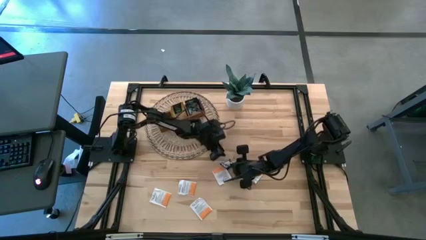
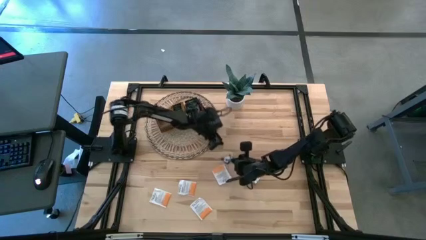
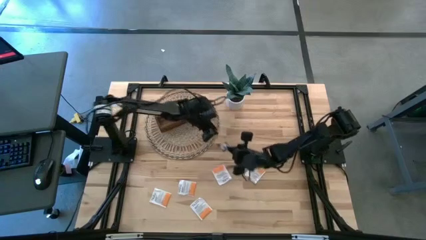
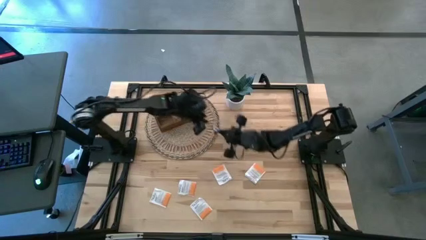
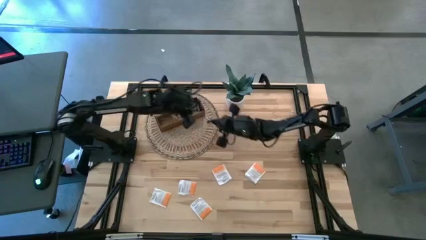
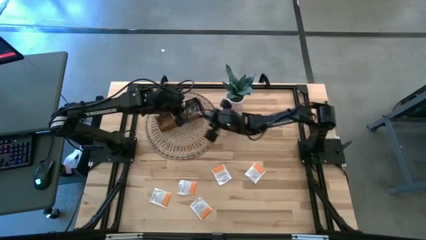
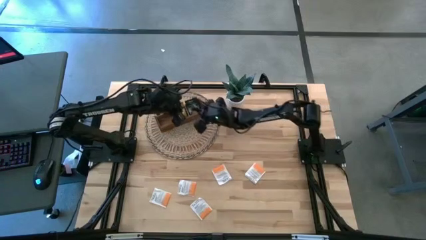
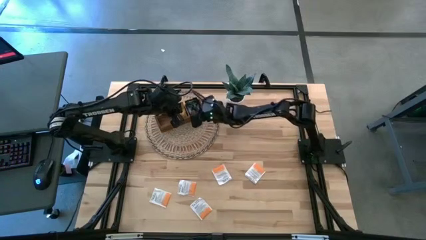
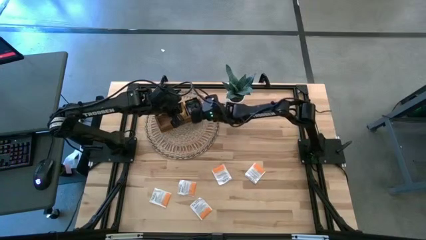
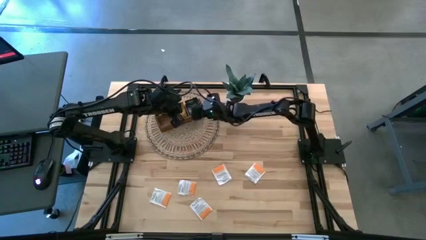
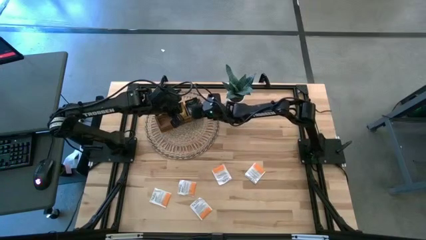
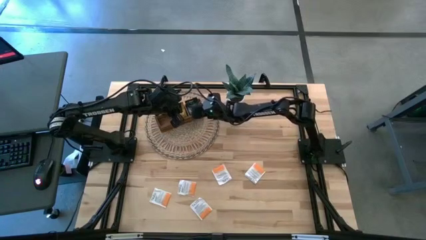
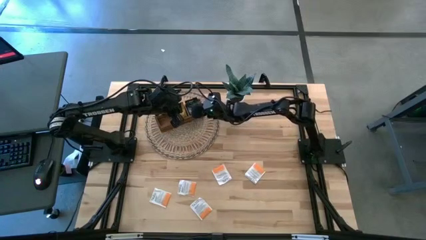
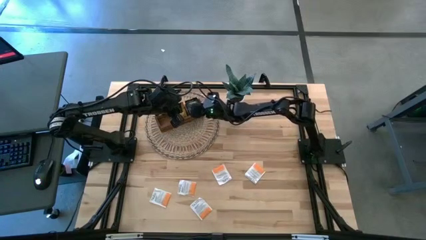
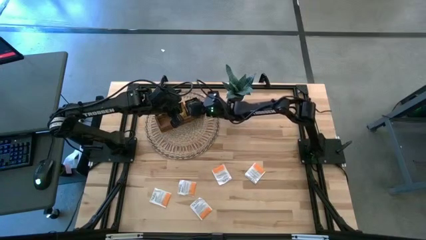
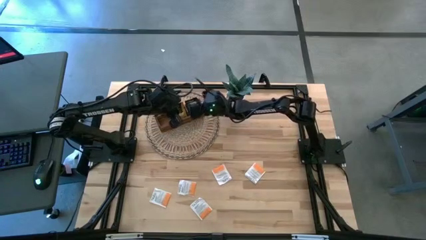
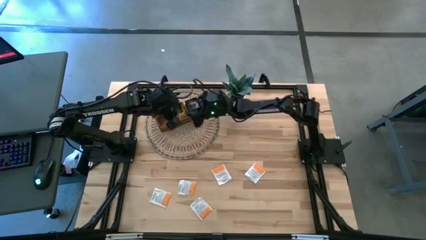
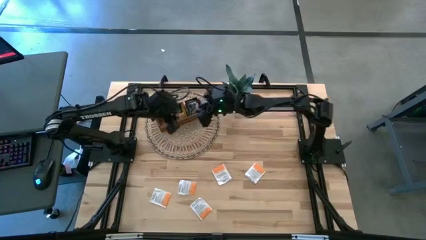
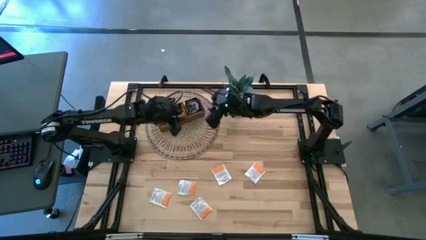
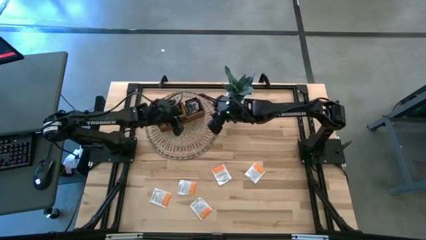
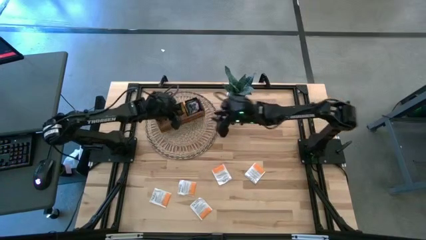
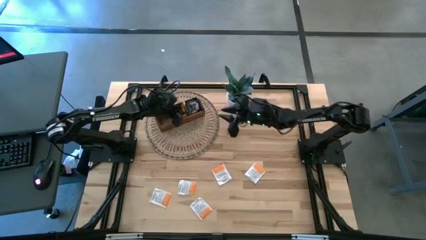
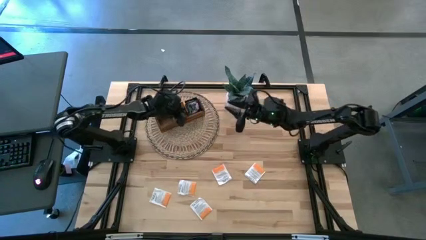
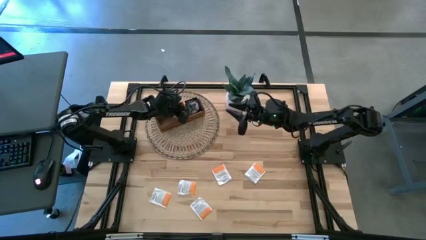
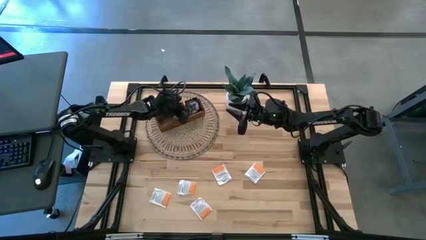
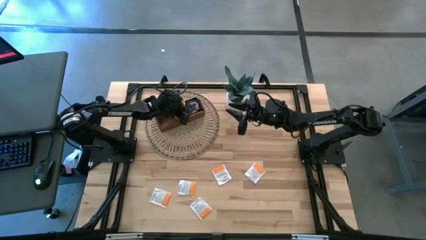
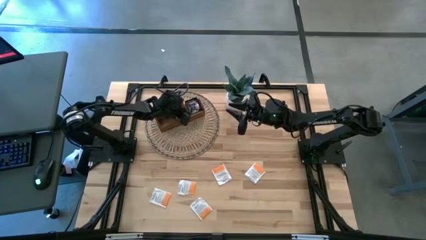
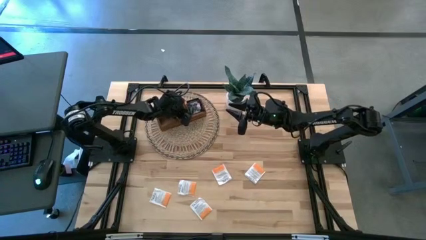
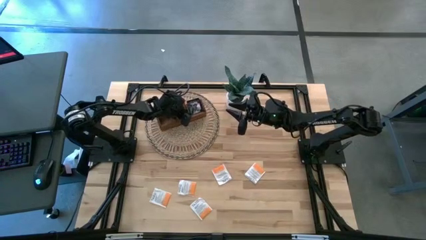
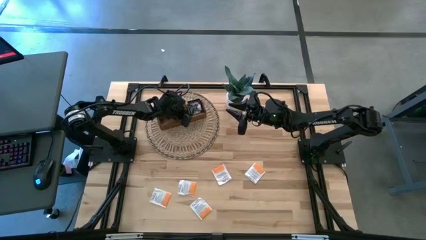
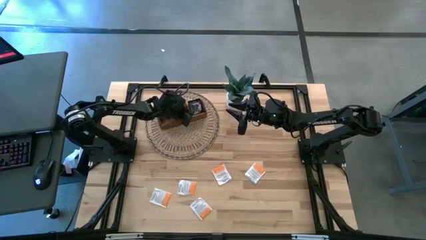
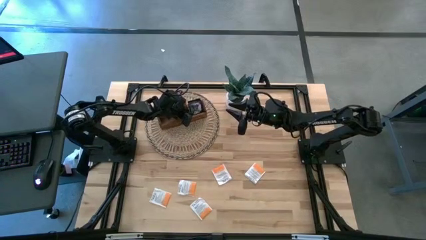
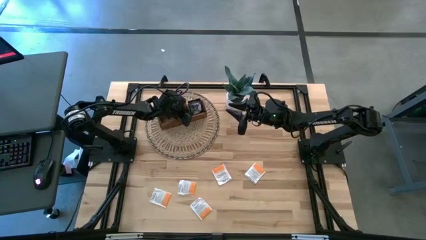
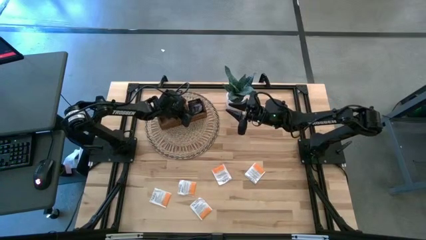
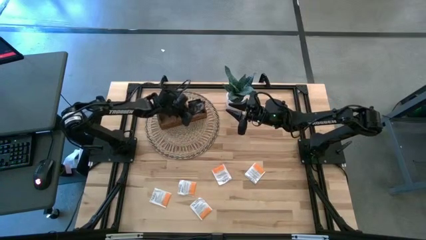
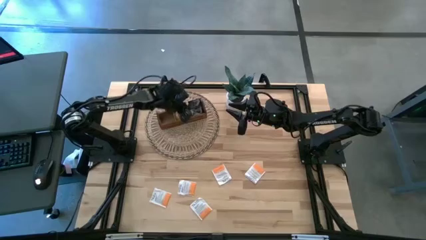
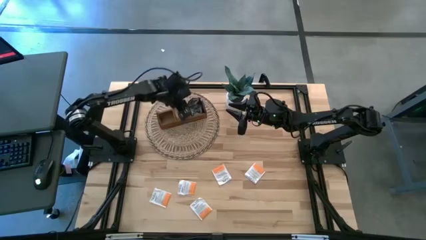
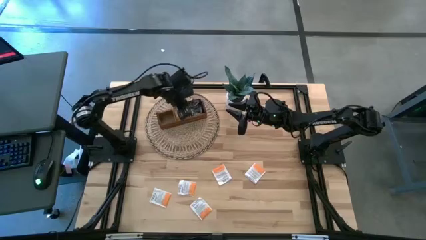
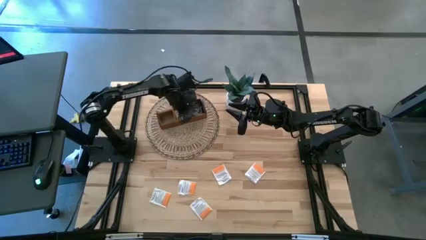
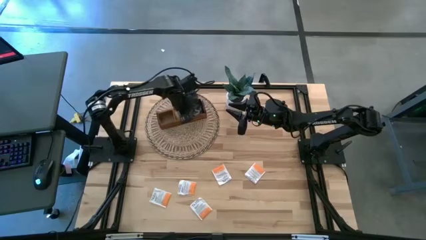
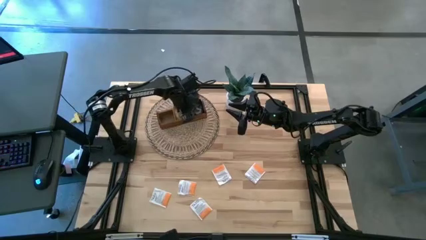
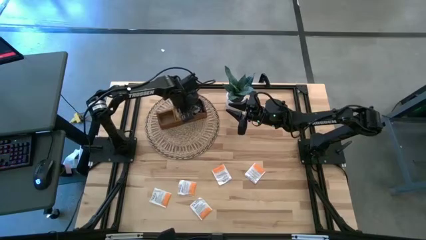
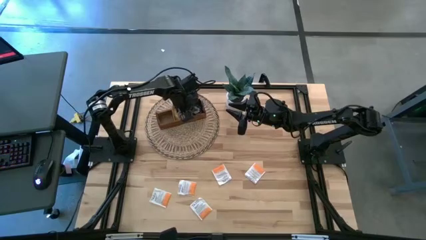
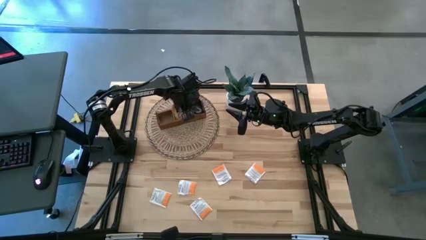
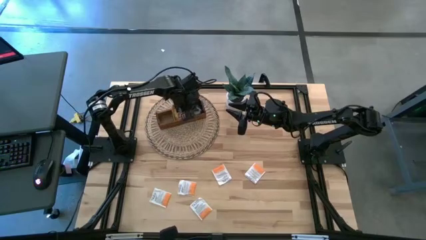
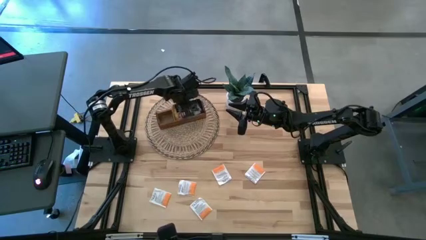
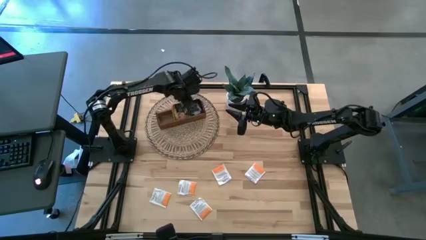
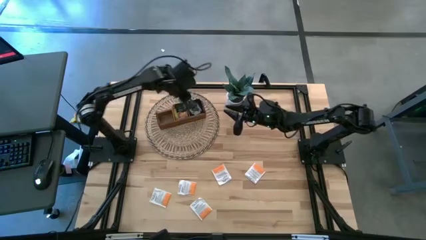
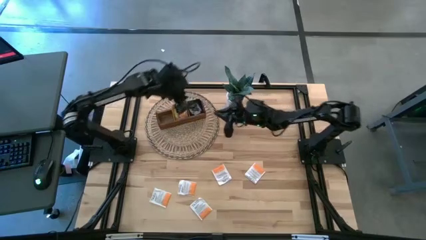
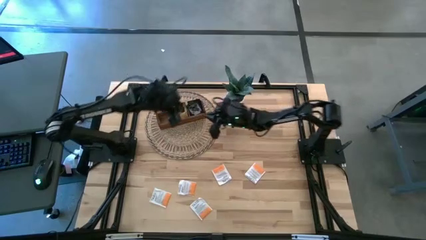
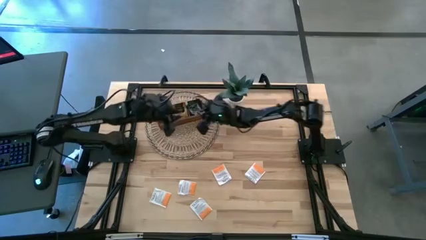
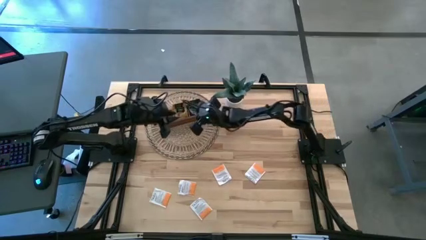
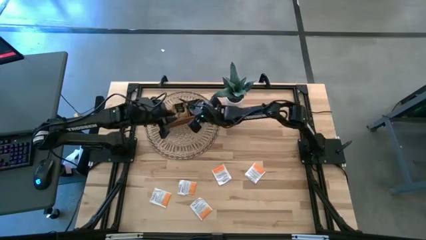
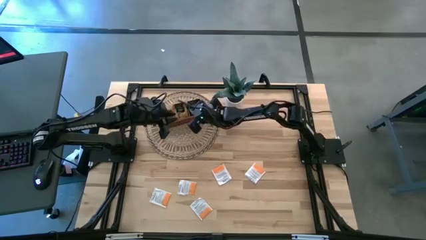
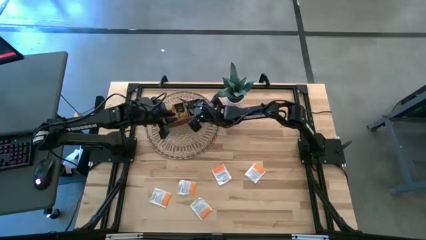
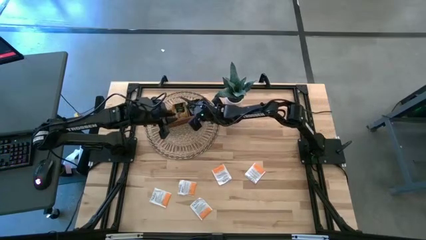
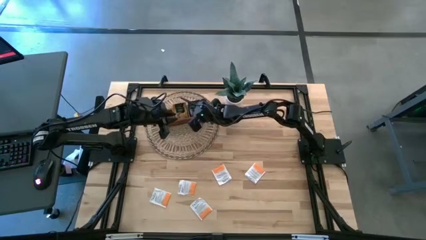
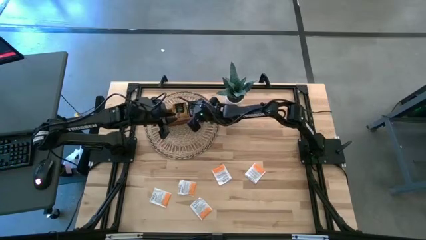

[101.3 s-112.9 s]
Task: Pick & Place Tea
Put the black tea bag into the right section of the wooden organizer

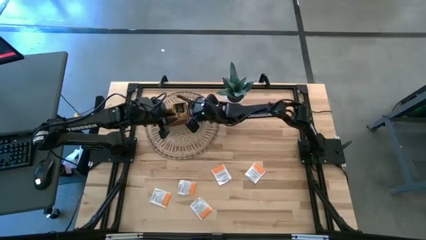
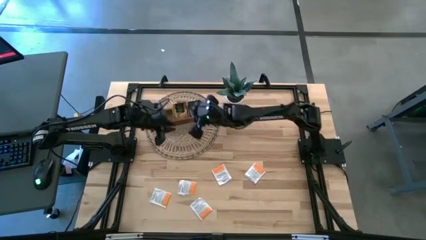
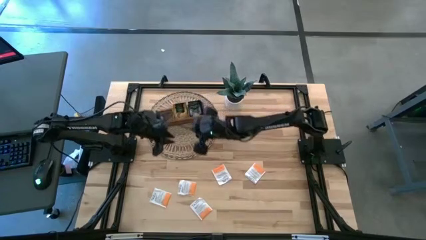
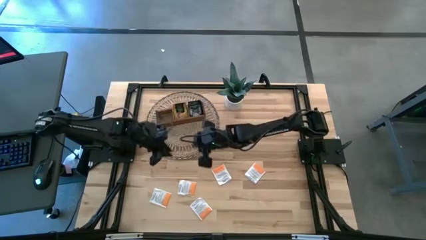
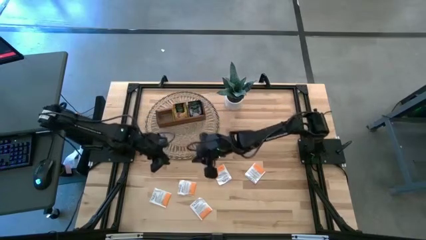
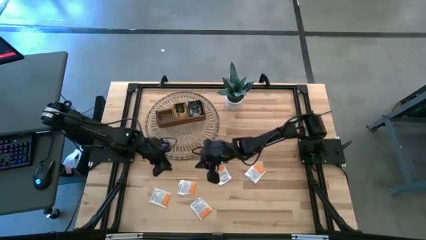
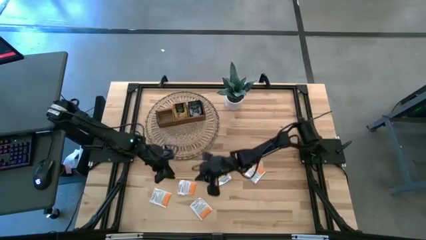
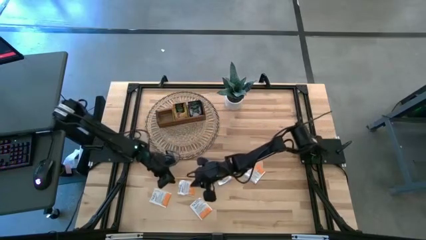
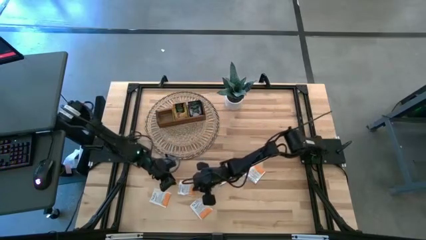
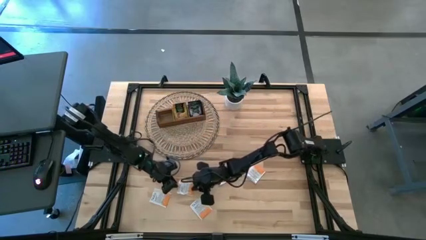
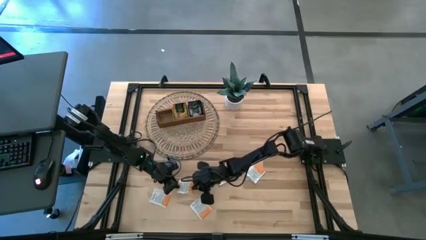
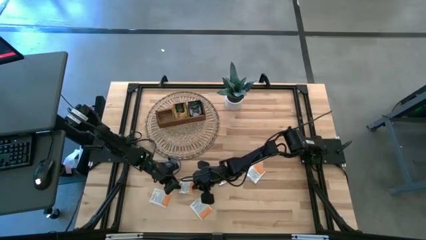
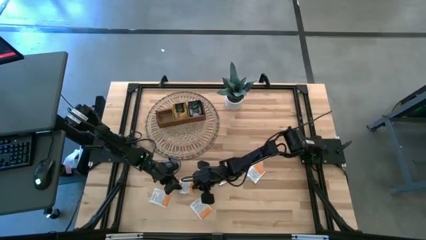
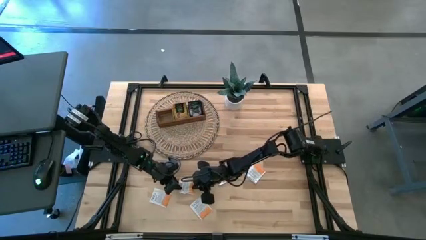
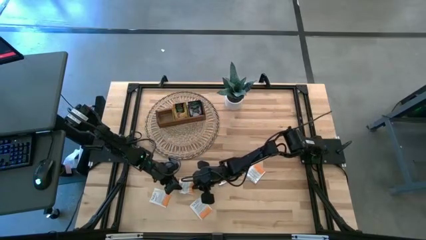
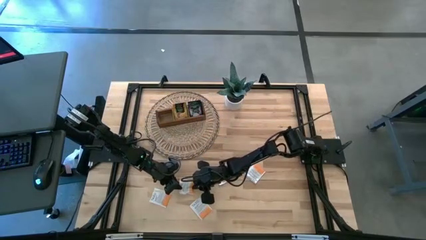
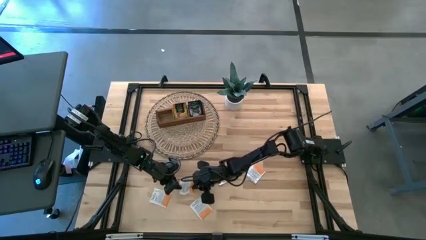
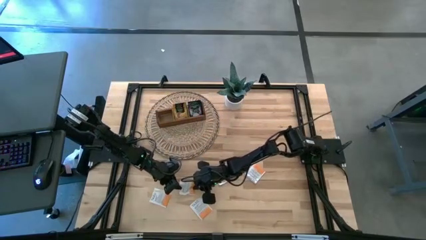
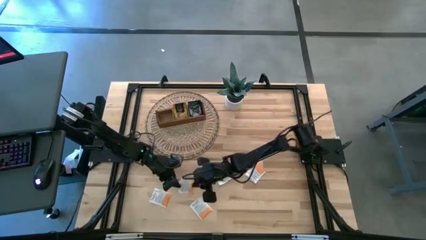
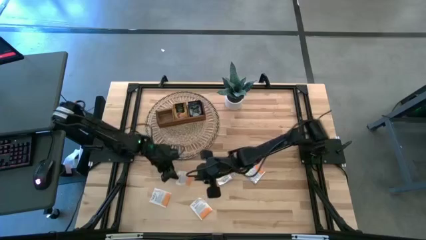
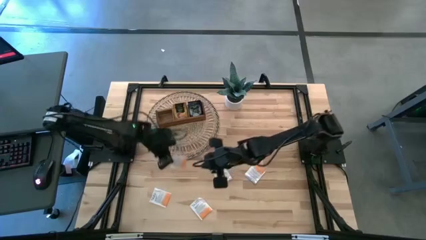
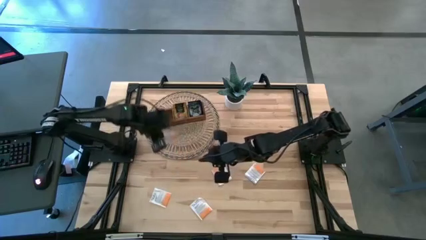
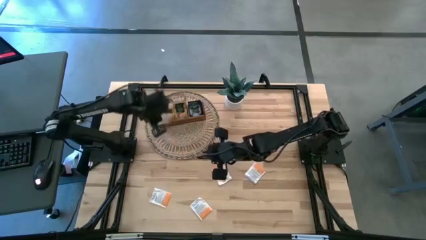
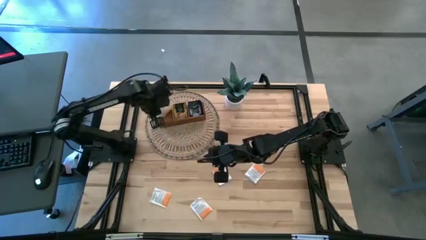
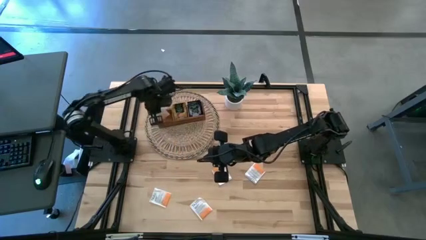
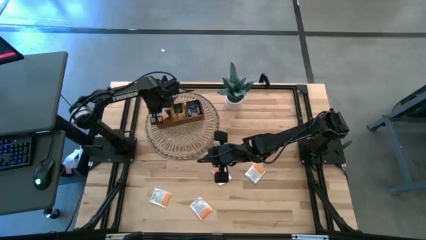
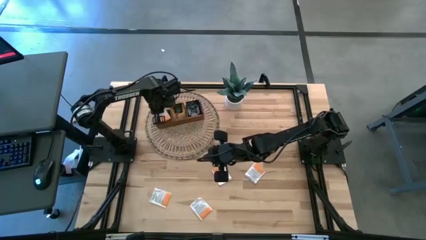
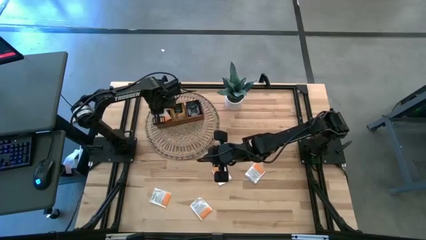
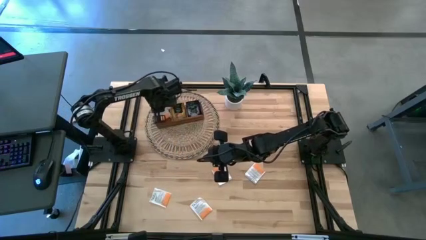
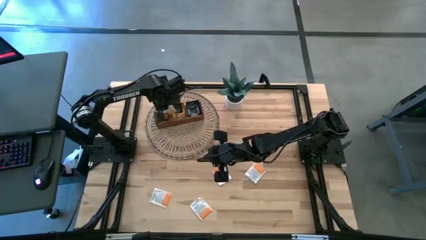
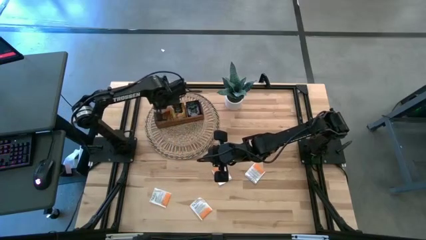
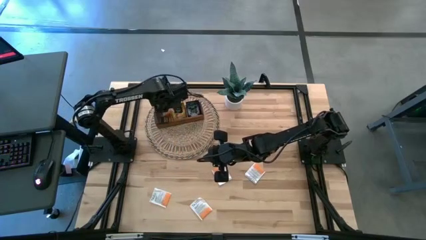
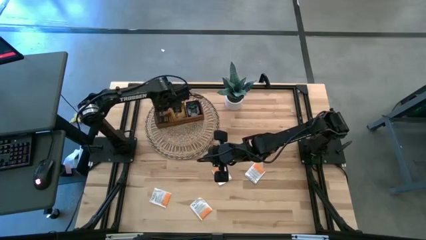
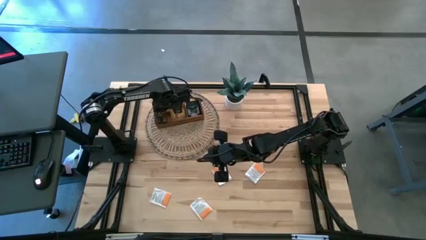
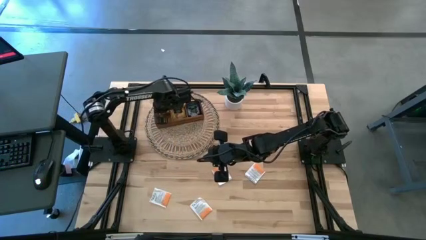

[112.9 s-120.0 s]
Put the white tea bag into the left section of the wooden organizer
